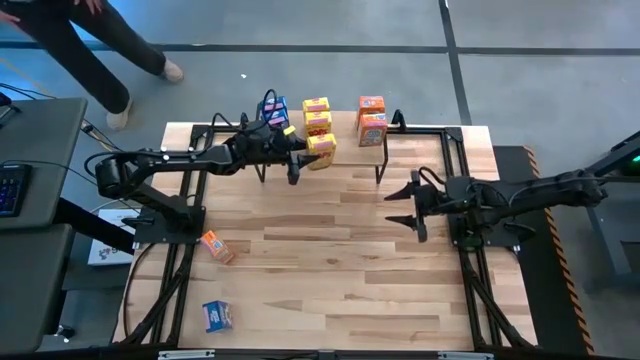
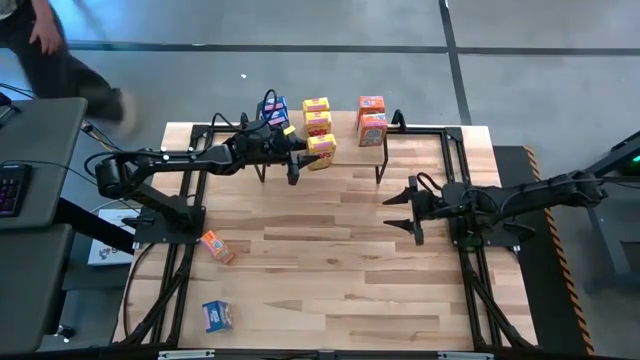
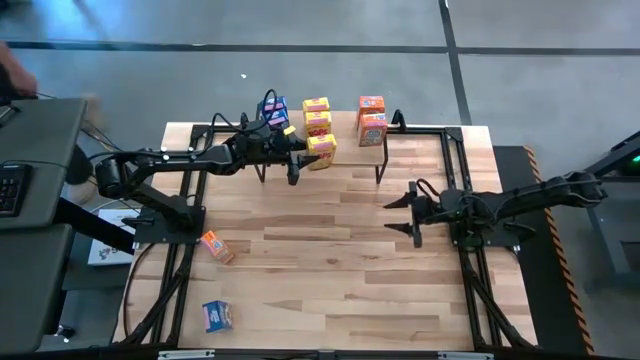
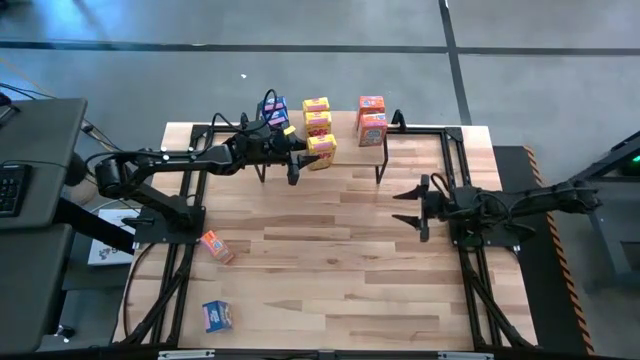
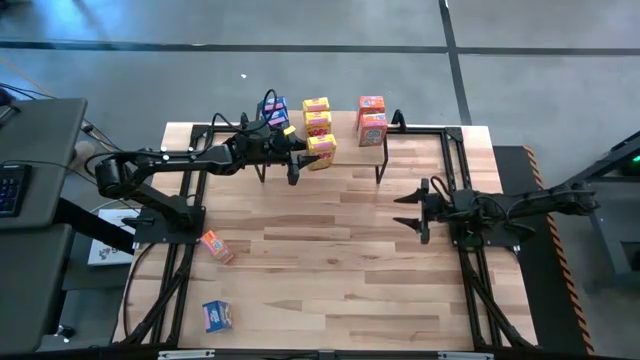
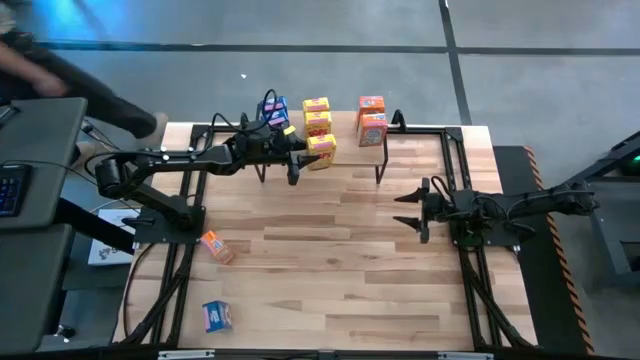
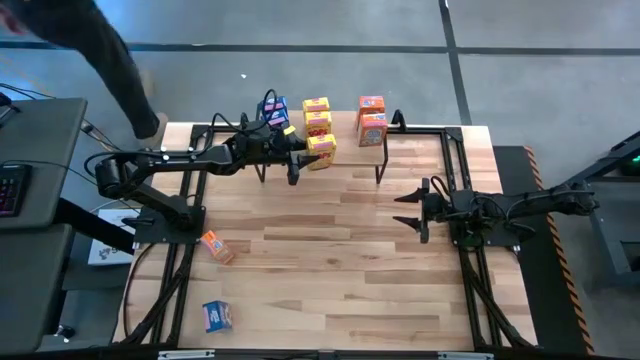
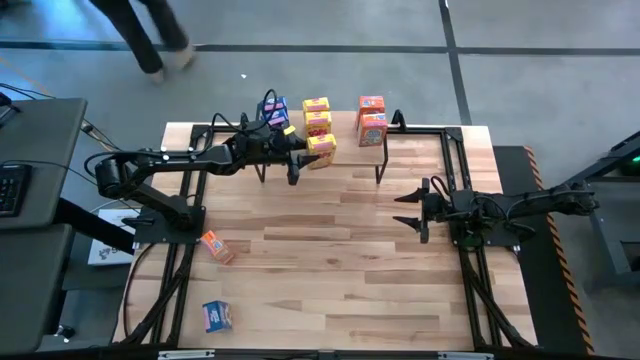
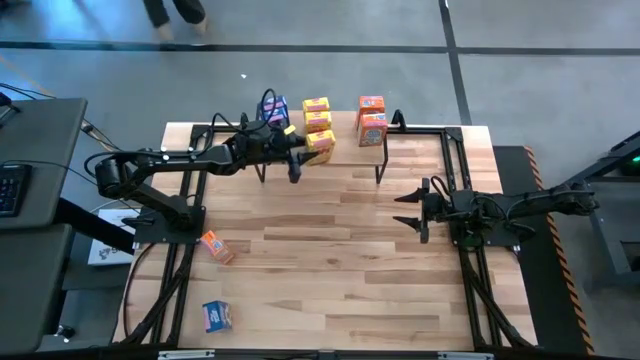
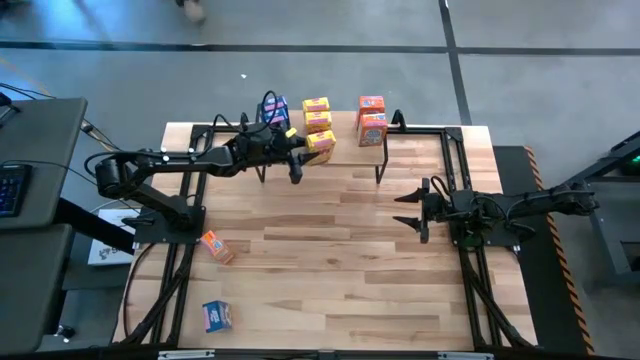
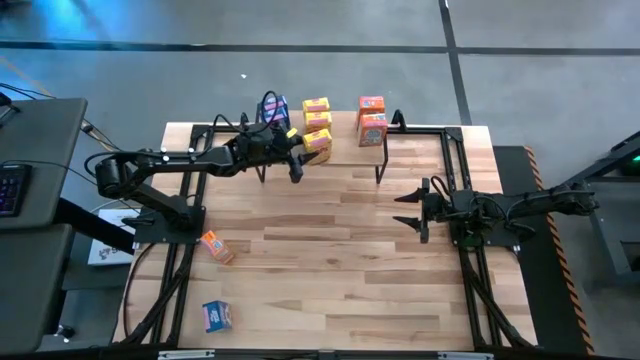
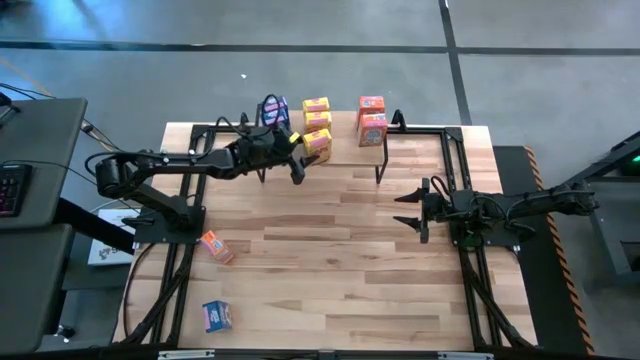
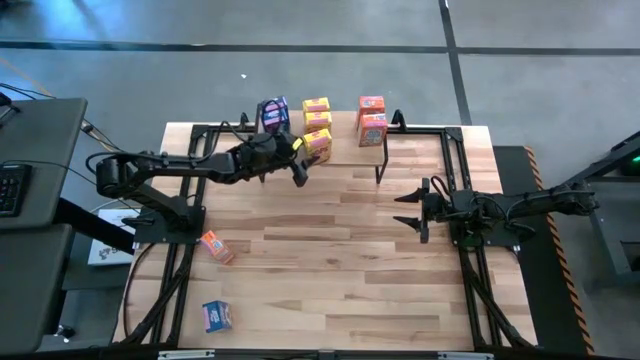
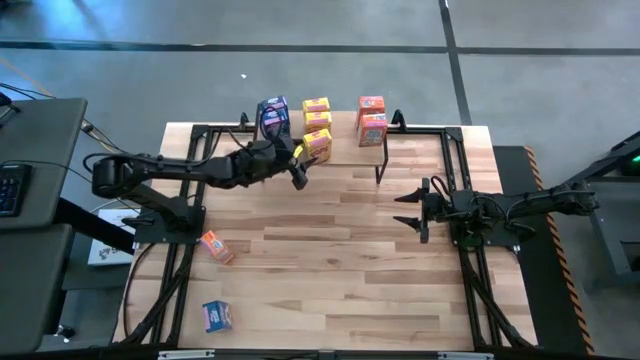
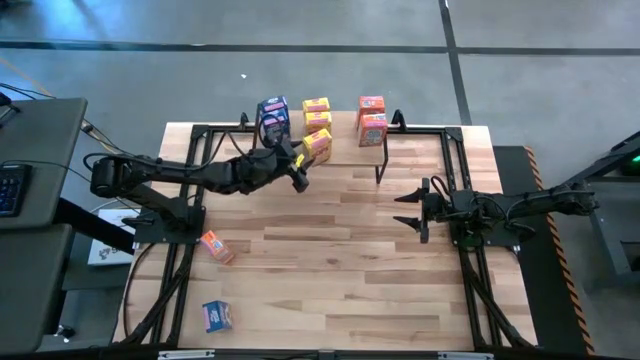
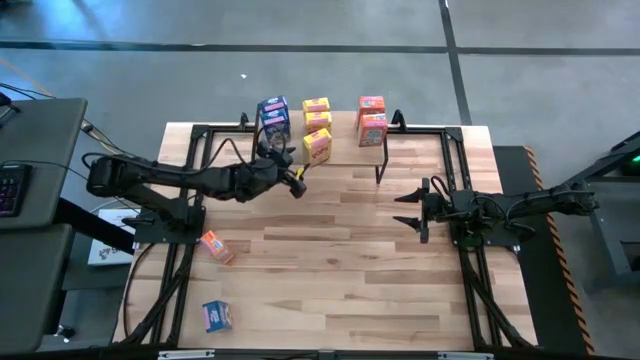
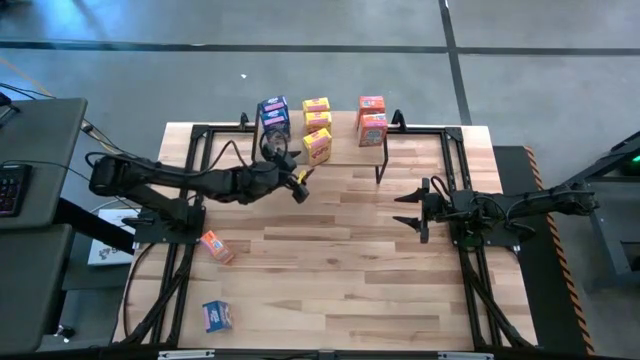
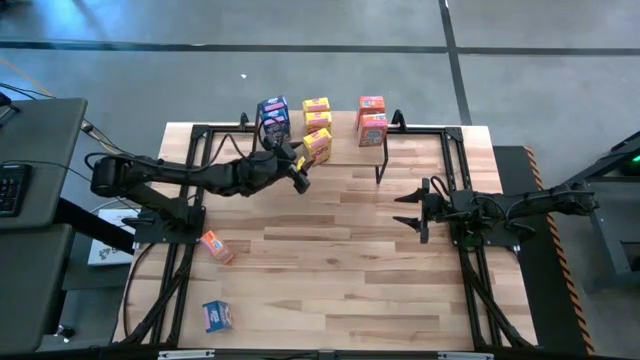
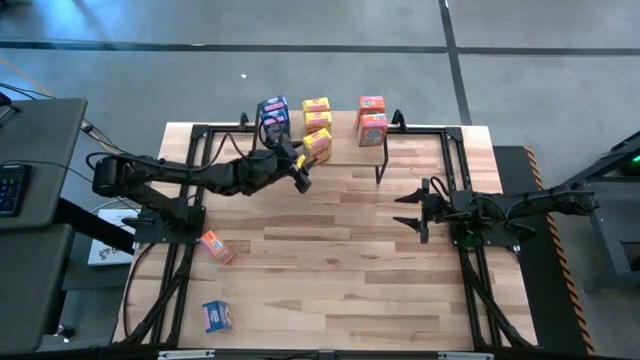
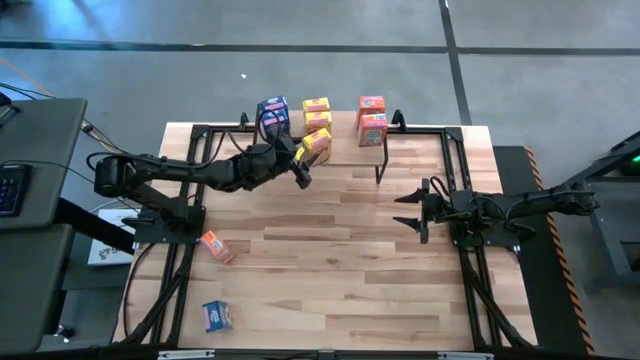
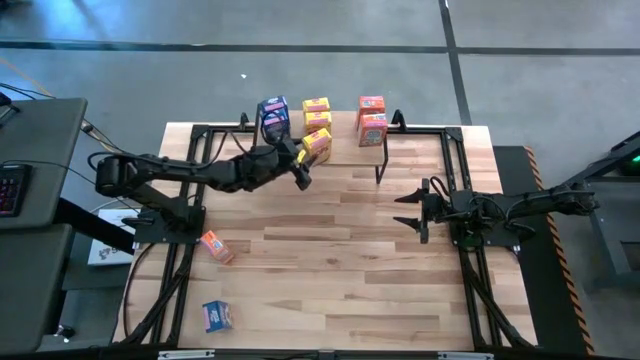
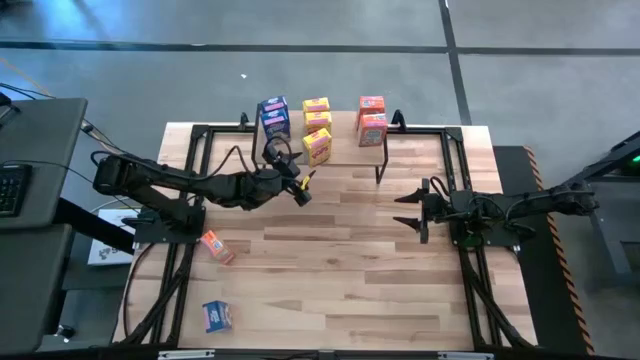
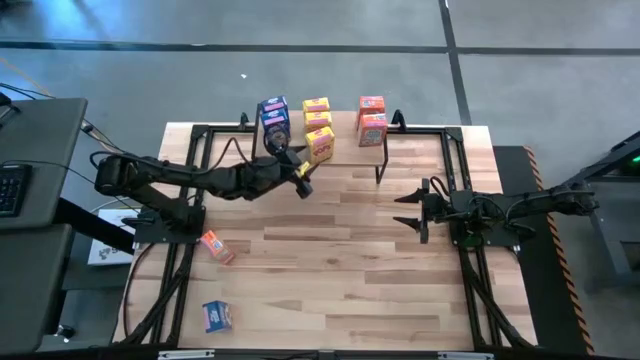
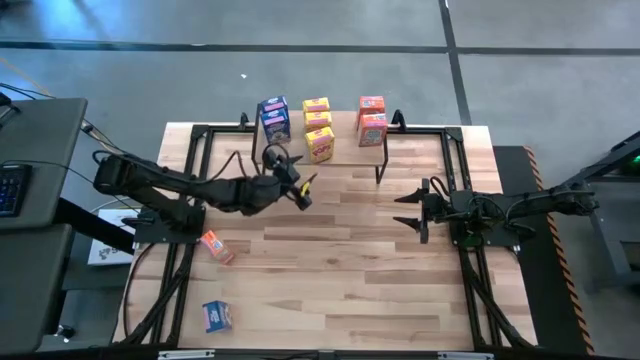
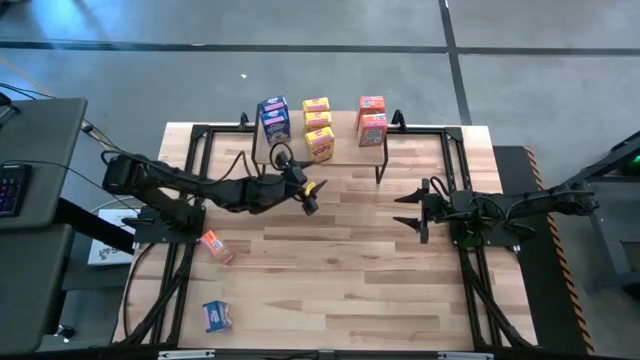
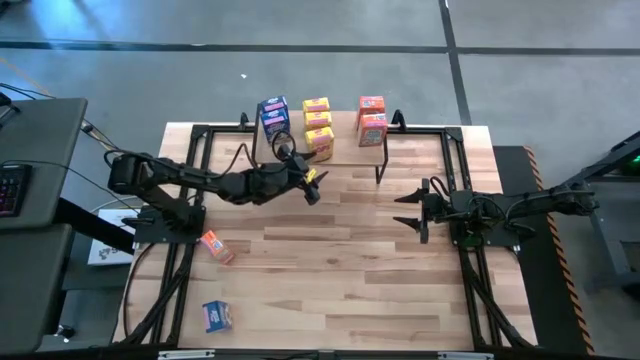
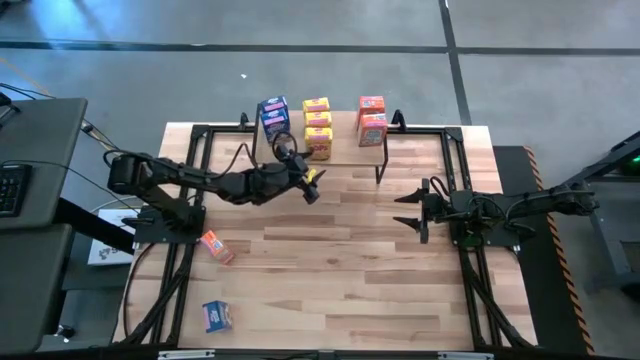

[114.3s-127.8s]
Task: Stack cereal on shelf
Put the yellow cereal box and aligned with the other yellow cereal boxes on the shelf

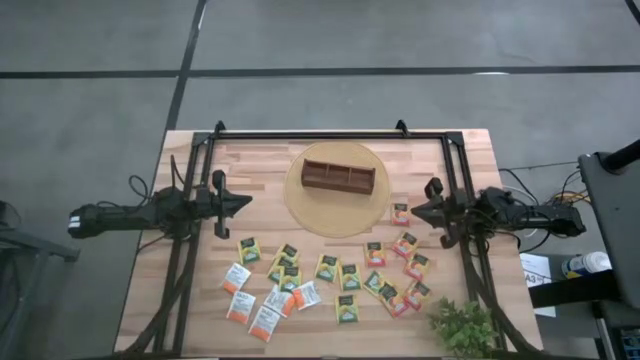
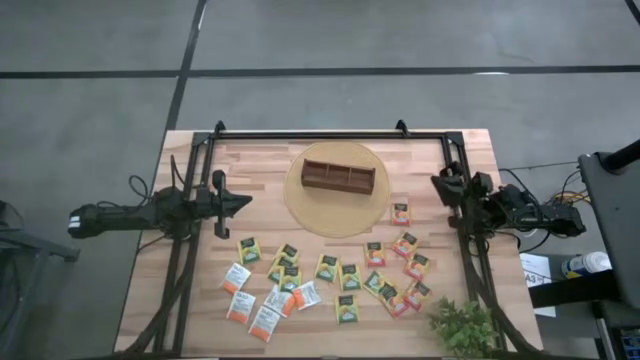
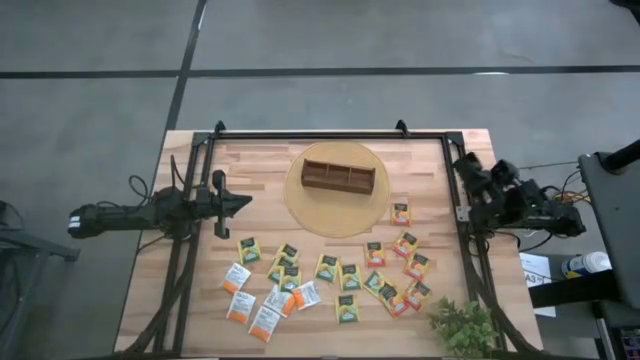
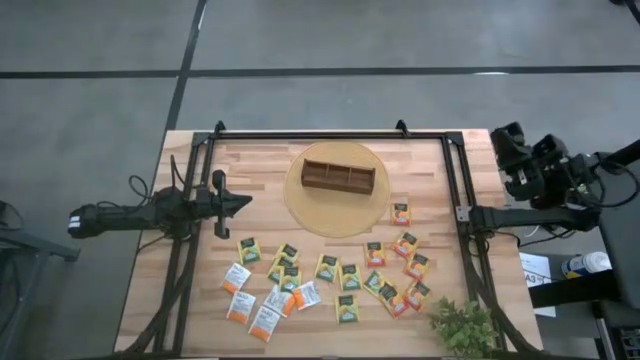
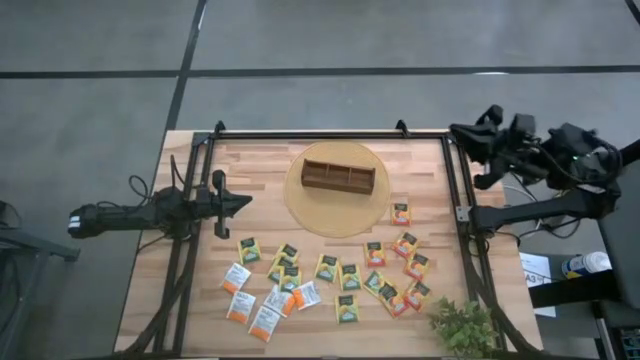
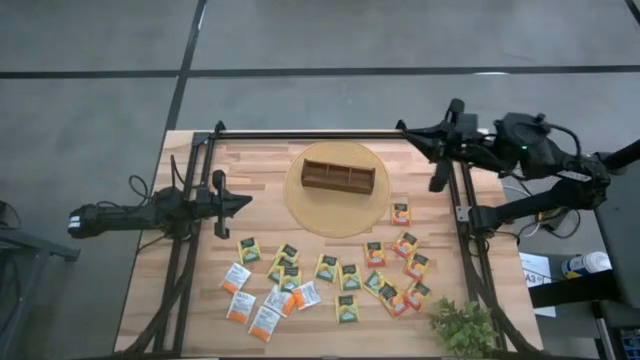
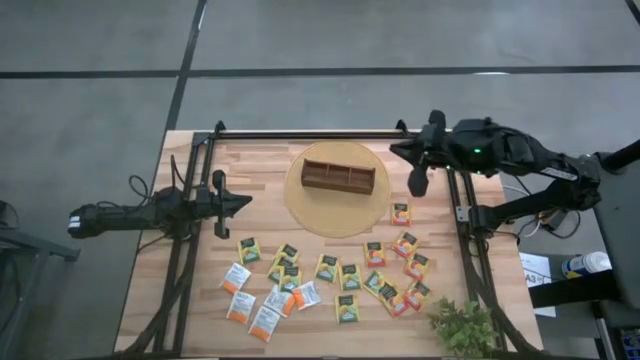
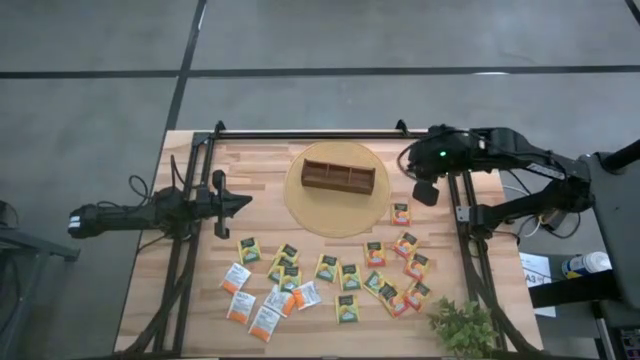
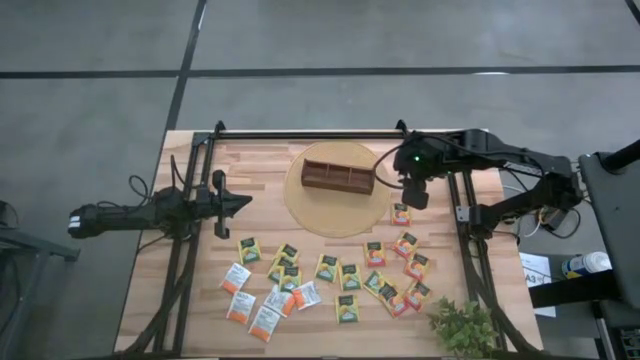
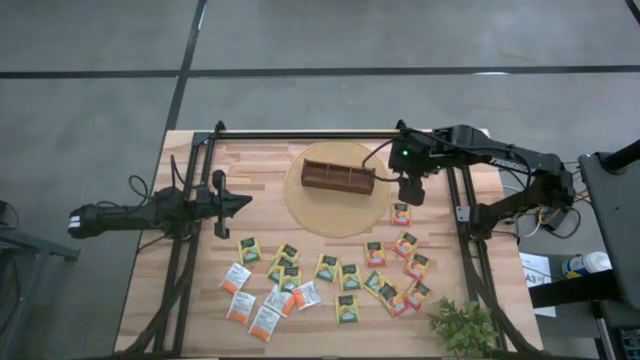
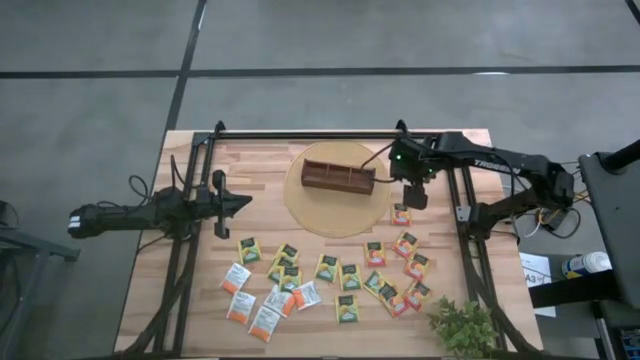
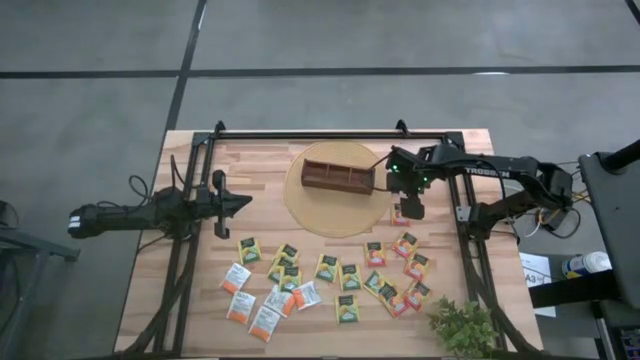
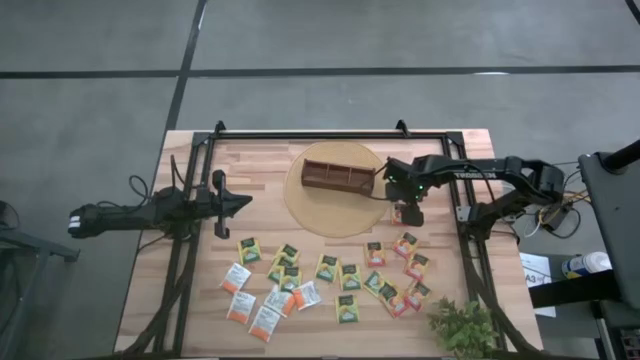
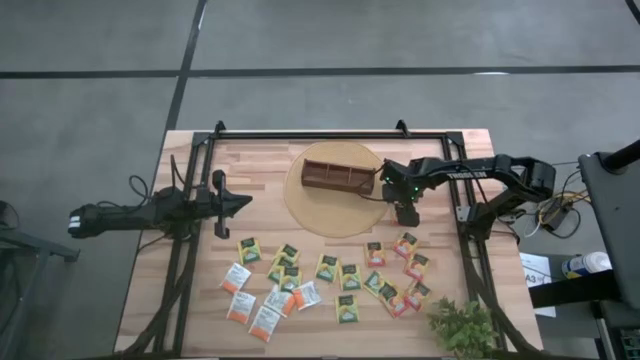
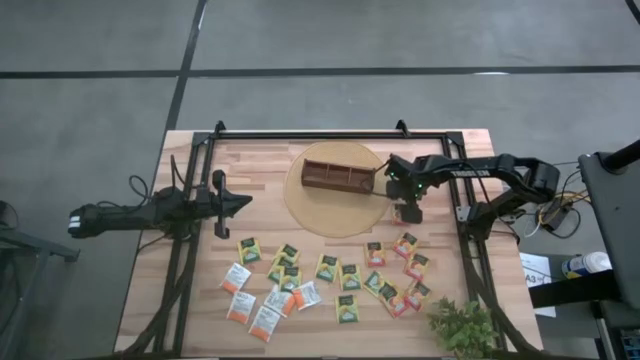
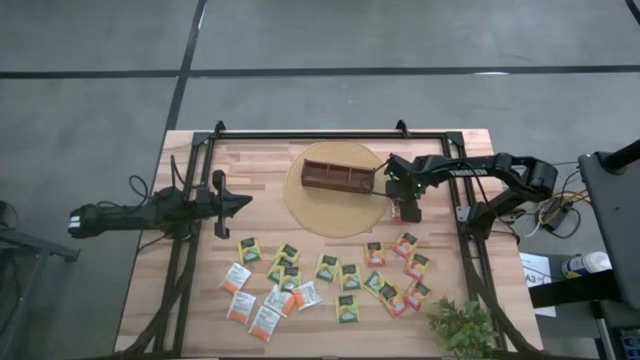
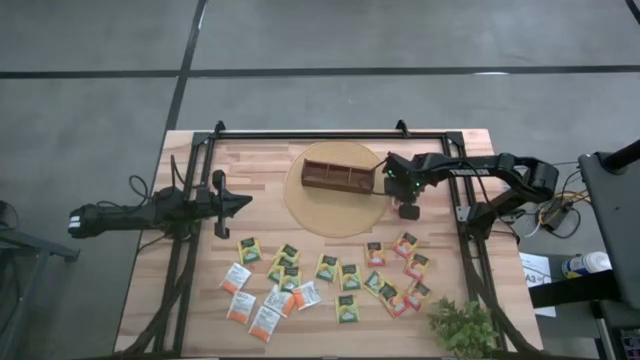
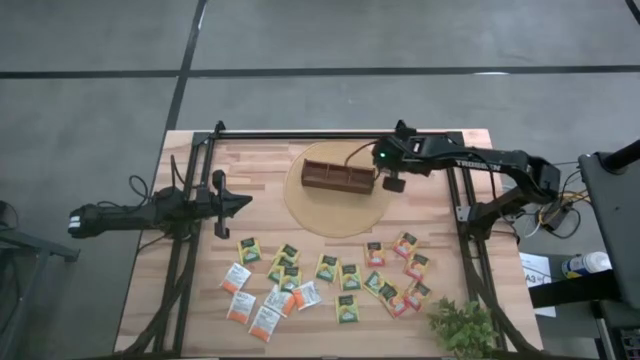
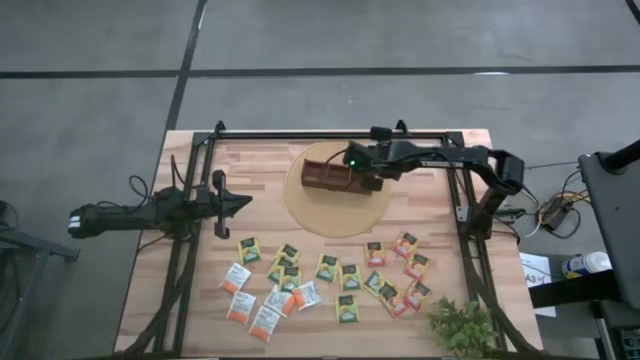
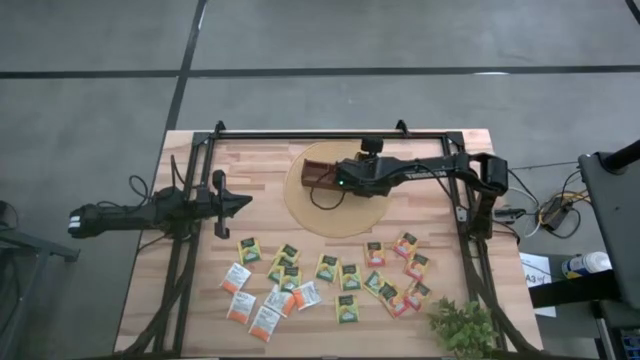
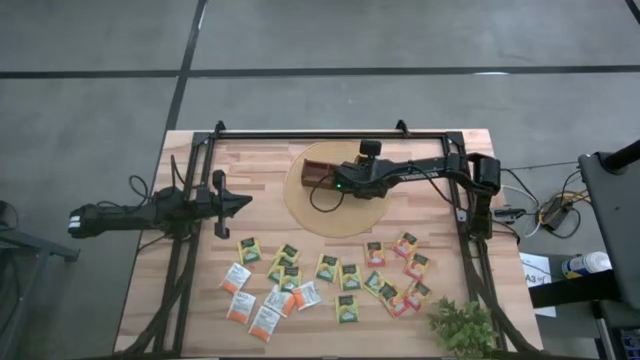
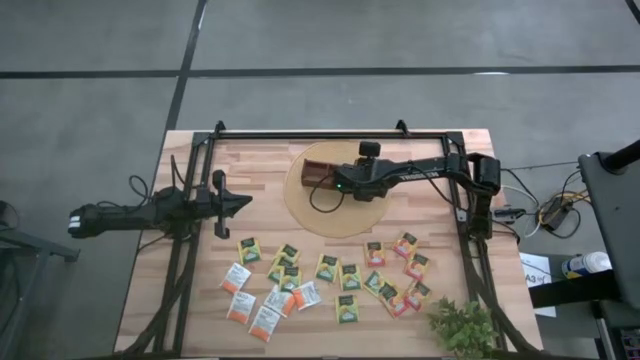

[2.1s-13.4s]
Task: Pick & Place Tea
Put the orange tea bag into the right section of wooden organizer
